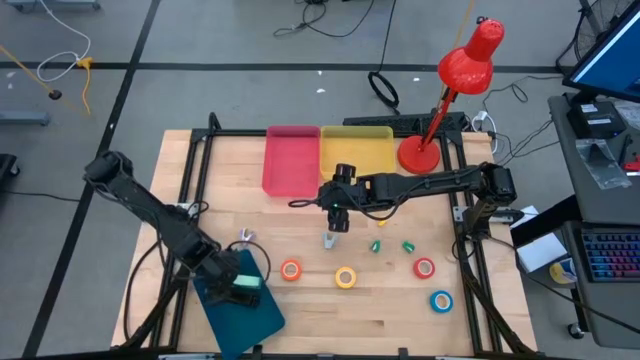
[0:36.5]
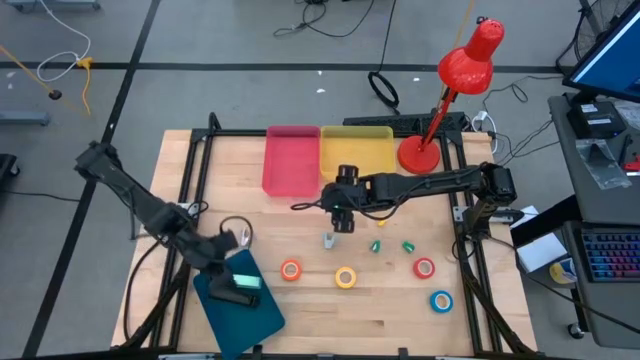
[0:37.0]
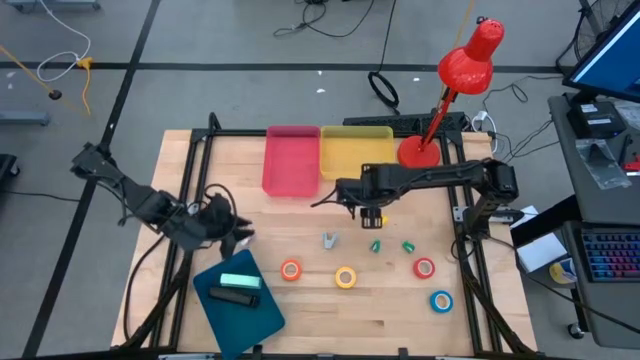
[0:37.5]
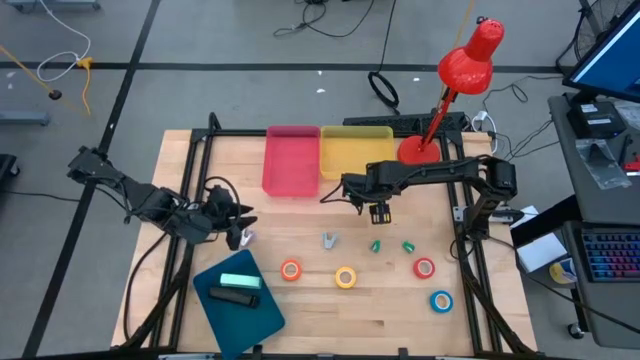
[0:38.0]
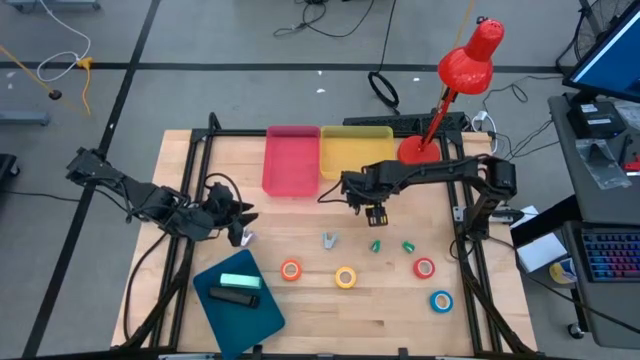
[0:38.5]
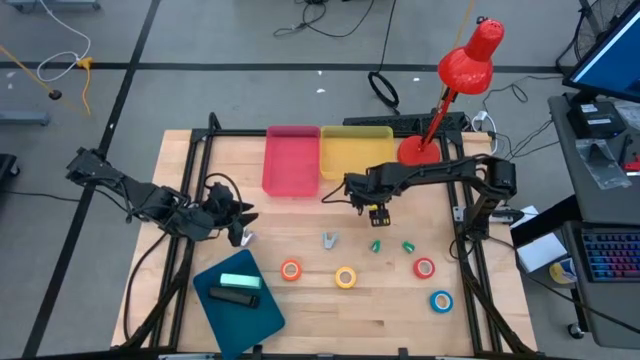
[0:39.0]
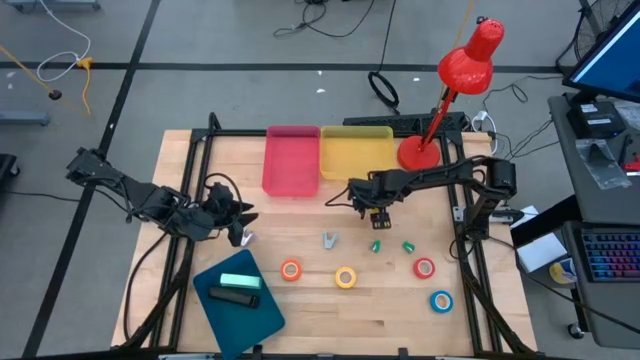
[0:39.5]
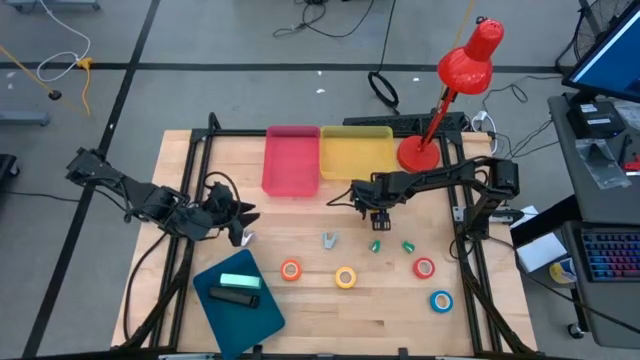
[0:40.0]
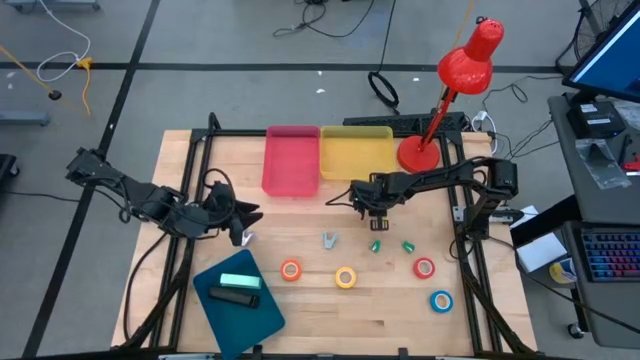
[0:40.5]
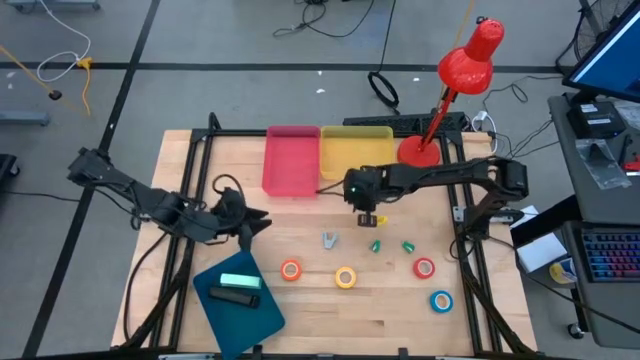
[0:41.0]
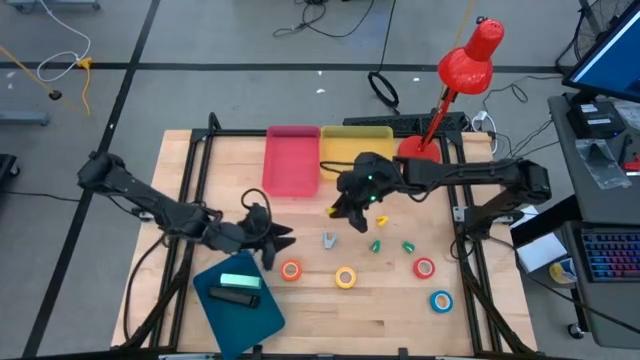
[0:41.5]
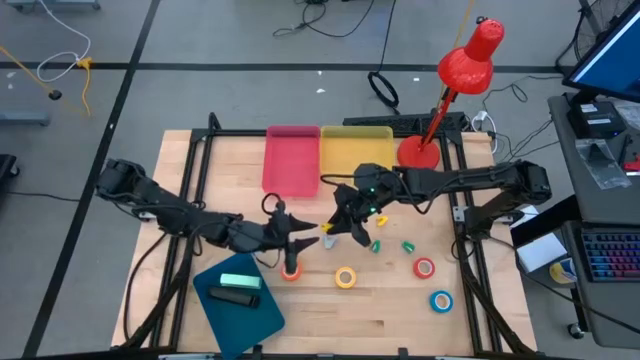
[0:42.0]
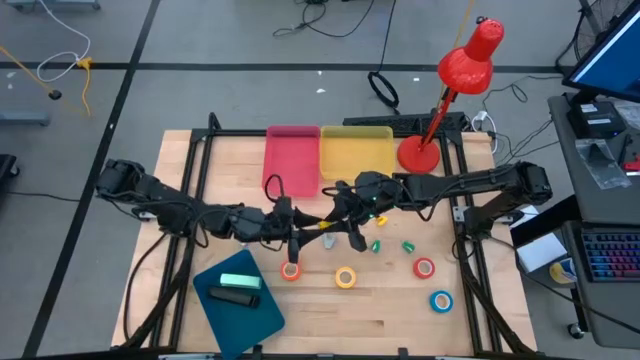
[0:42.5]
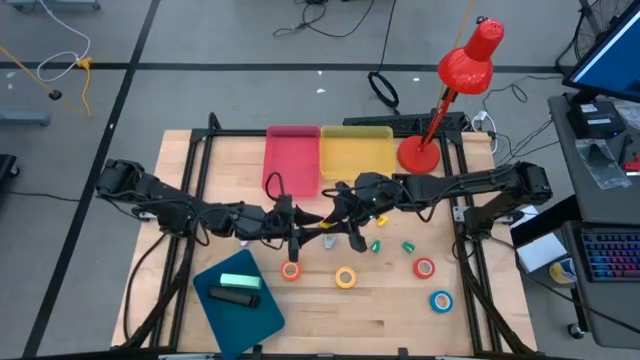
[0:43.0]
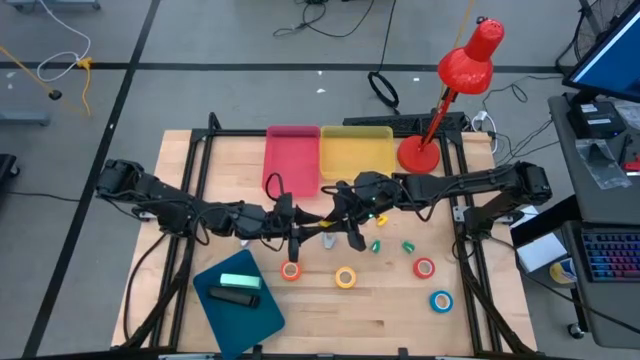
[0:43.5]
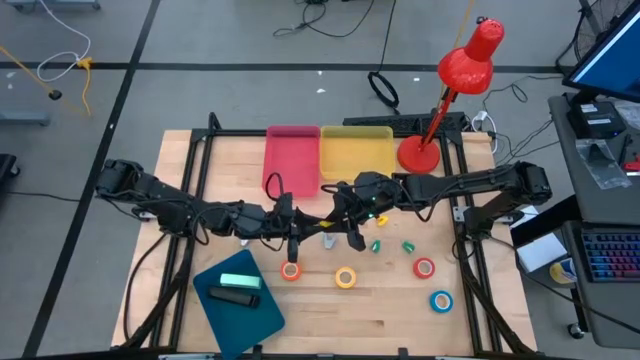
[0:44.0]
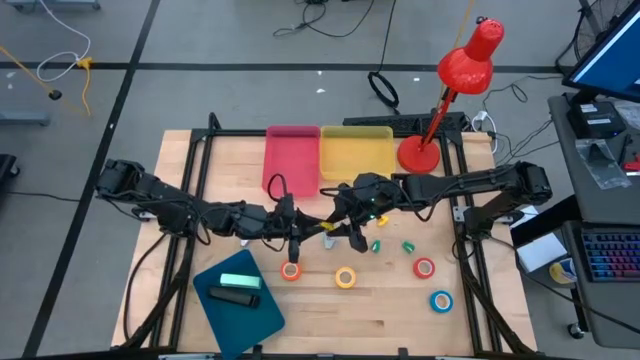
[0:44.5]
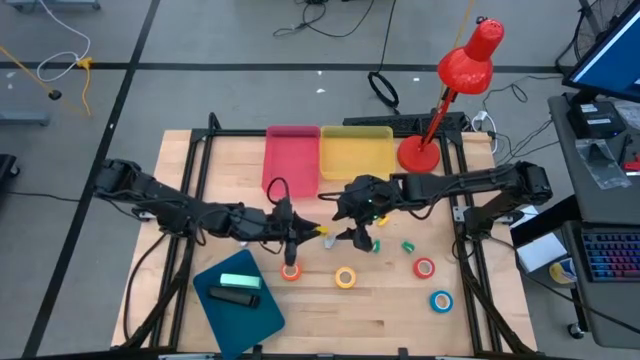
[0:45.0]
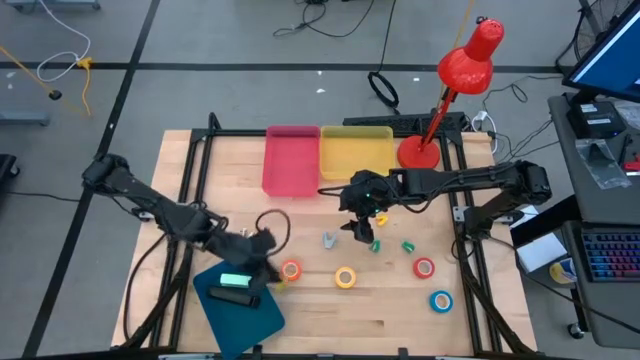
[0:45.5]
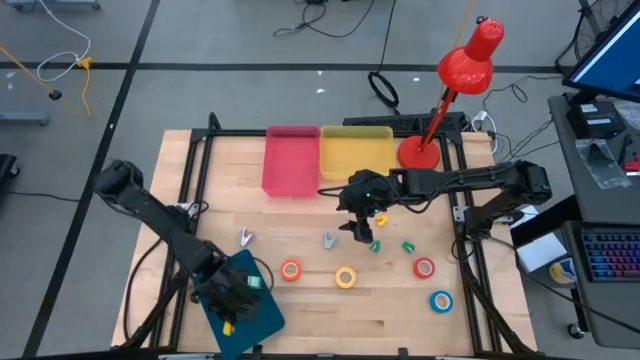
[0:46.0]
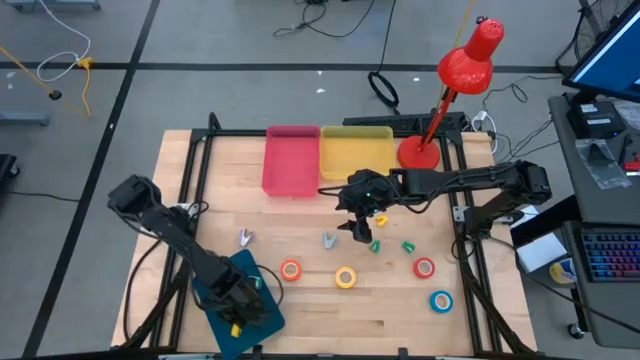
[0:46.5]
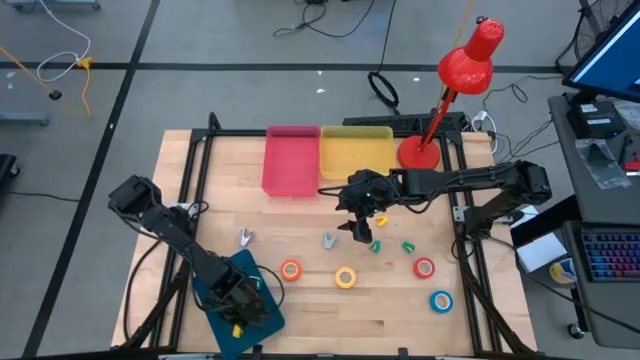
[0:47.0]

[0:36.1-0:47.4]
Task: Pick and place Stapler, Stapler remover, tape
Put the top yellow stapler into the blue bin

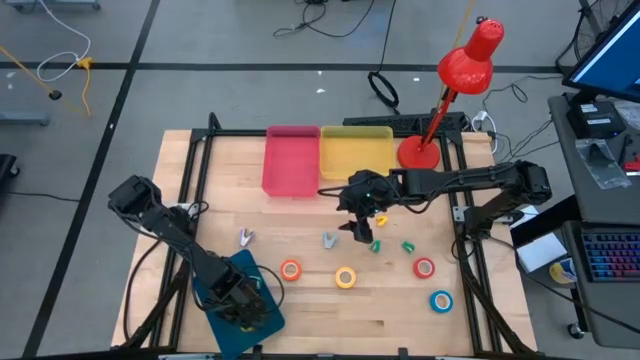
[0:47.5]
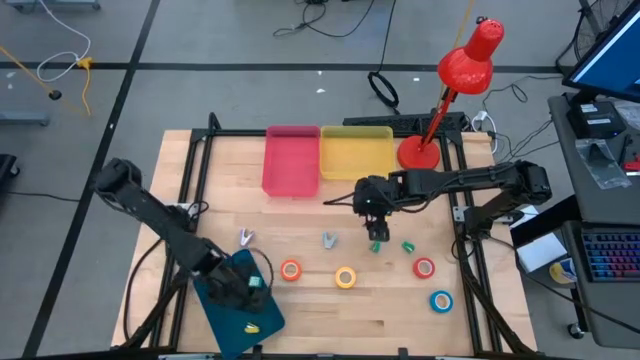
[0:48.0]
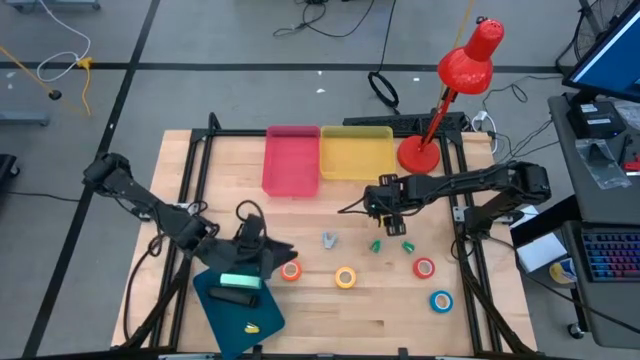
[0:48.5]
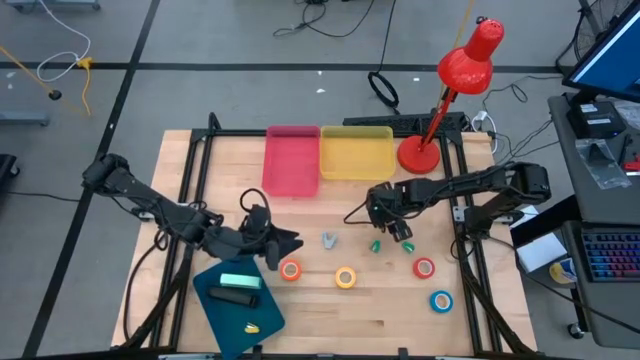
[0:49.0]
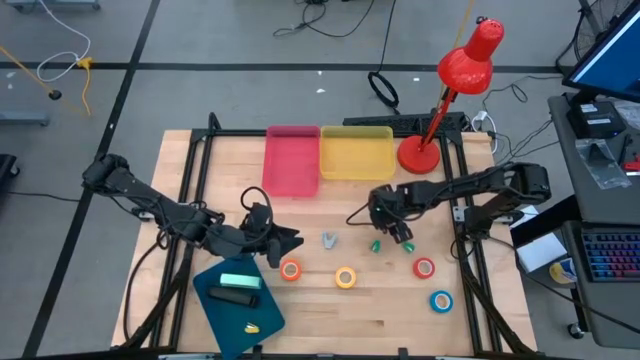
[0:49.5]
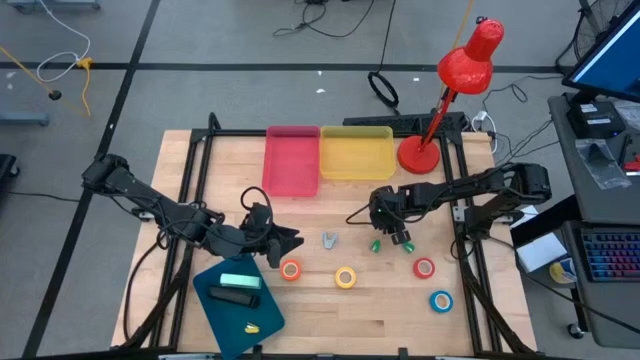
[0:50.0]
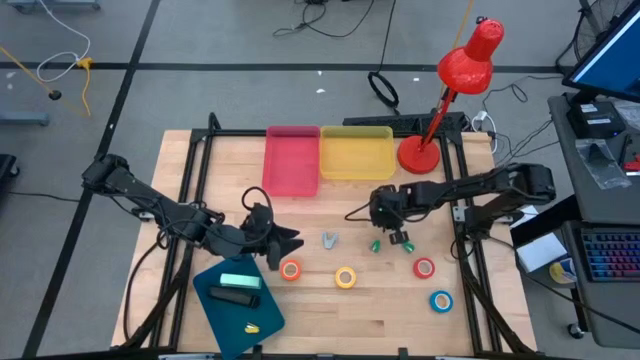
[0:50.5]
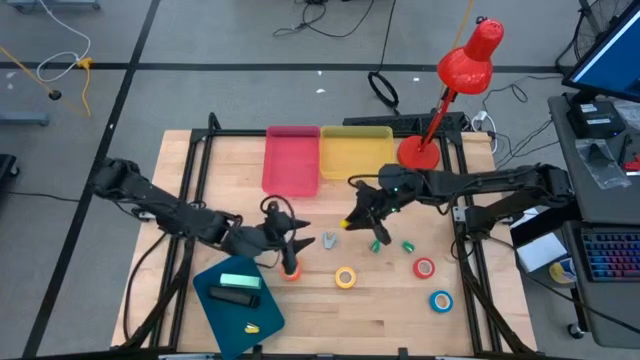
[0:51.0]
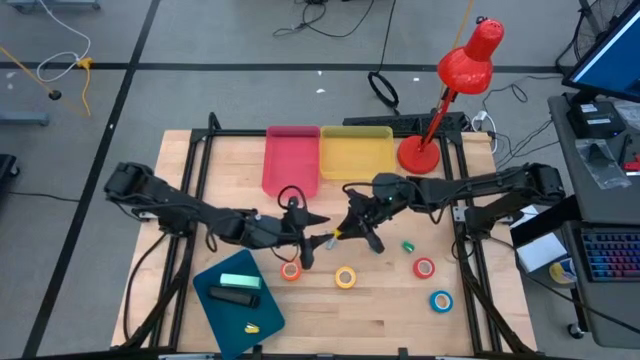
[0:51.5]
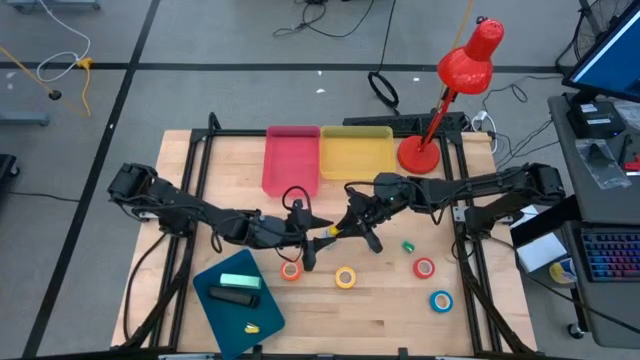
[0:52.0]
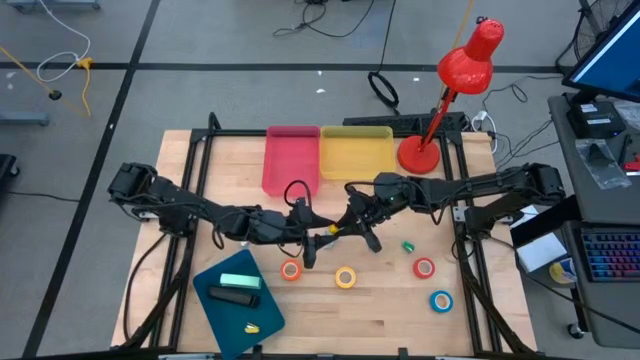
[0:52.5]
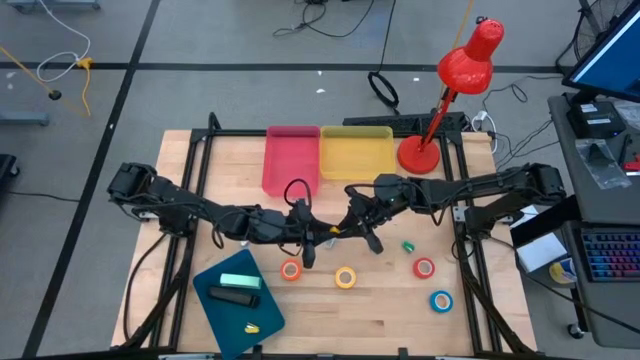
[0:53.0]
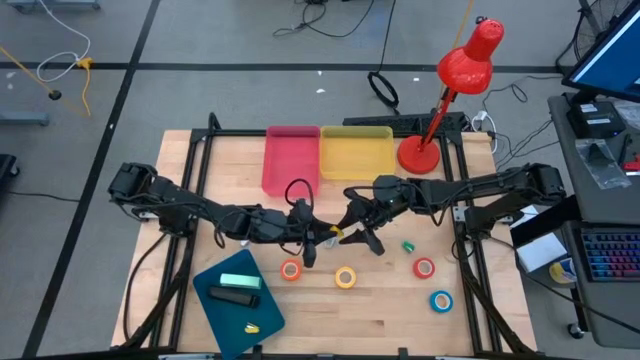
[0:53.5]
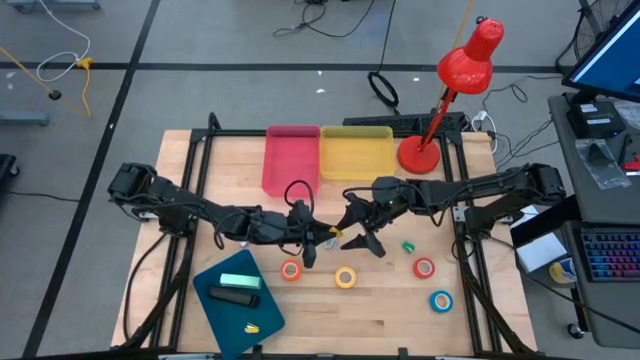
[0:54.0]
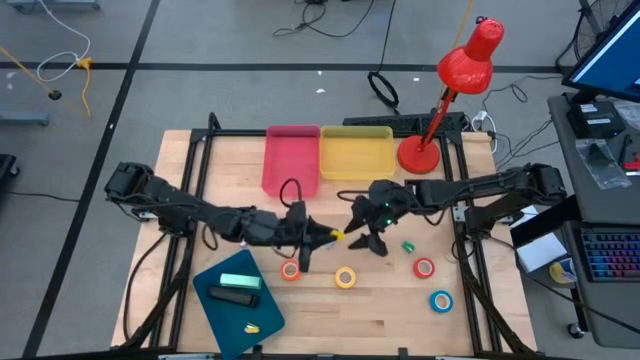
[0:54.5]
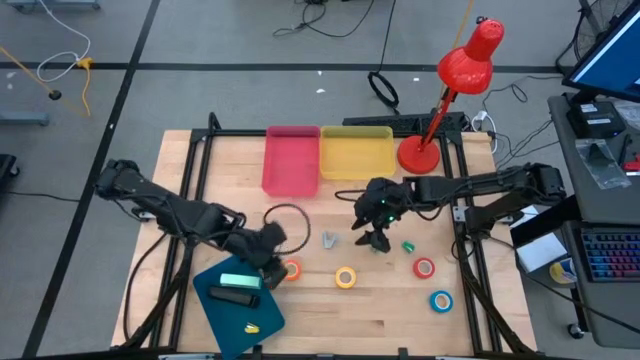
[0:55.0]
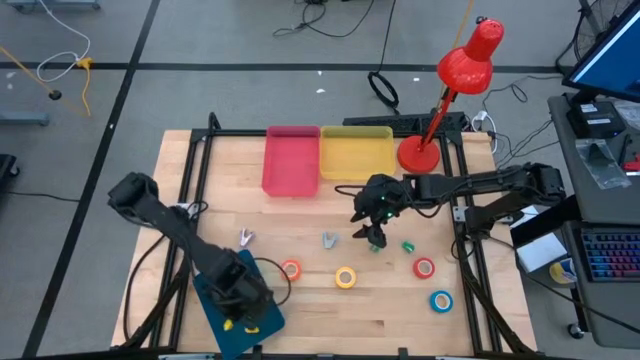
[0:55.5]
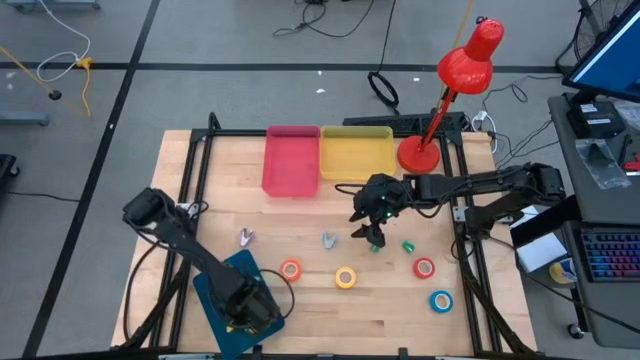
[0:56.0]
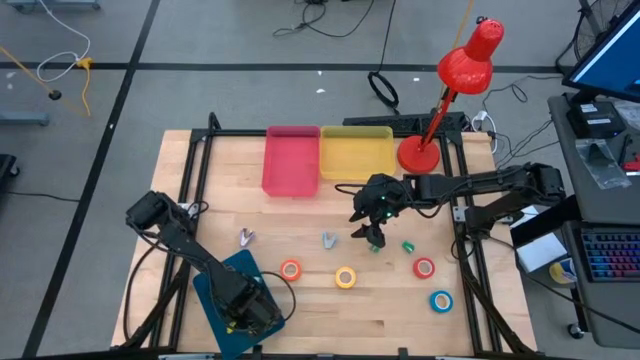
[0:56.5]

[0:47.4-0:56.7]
Put the yellow stapler into the blue bin
